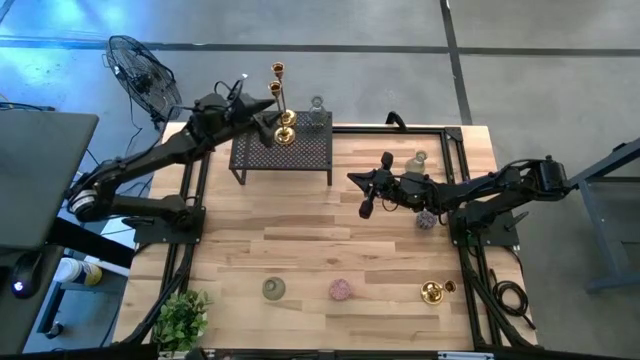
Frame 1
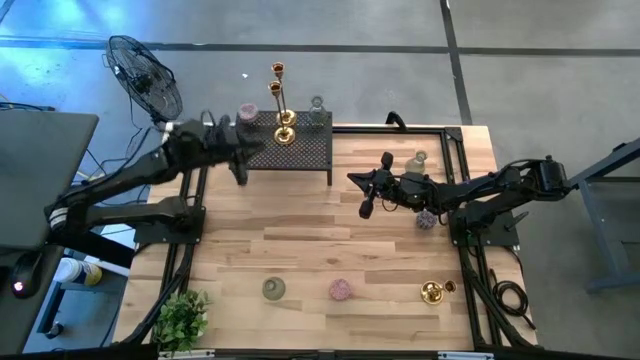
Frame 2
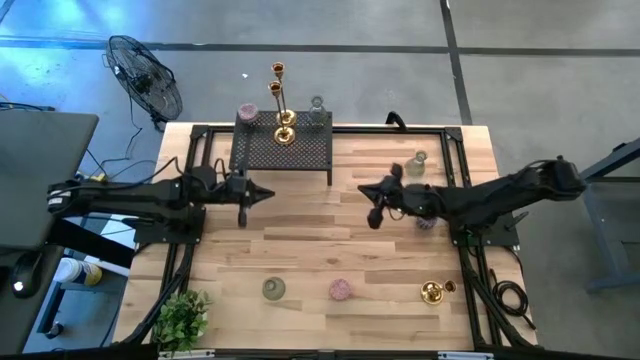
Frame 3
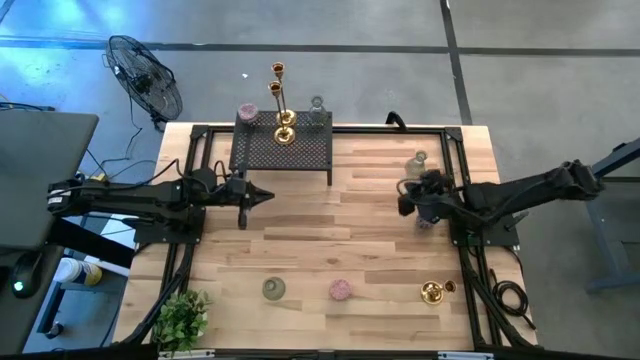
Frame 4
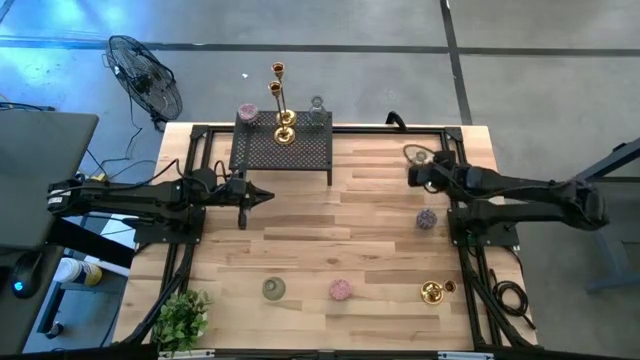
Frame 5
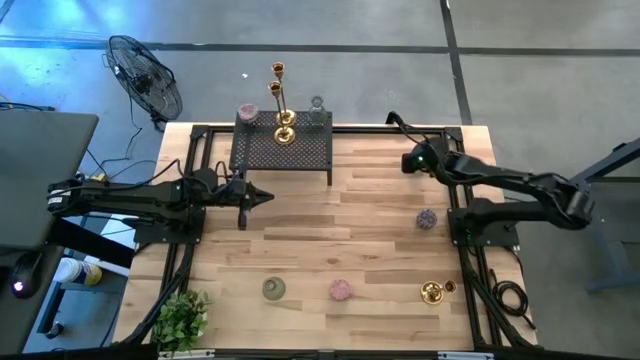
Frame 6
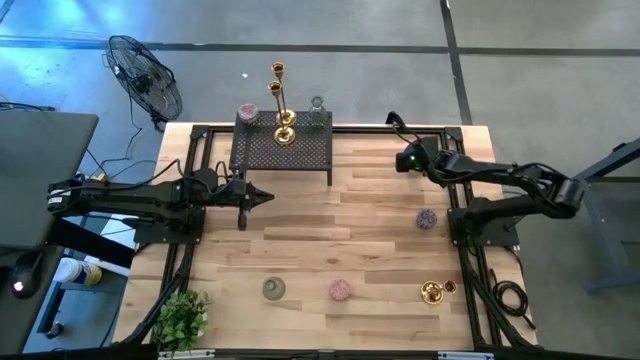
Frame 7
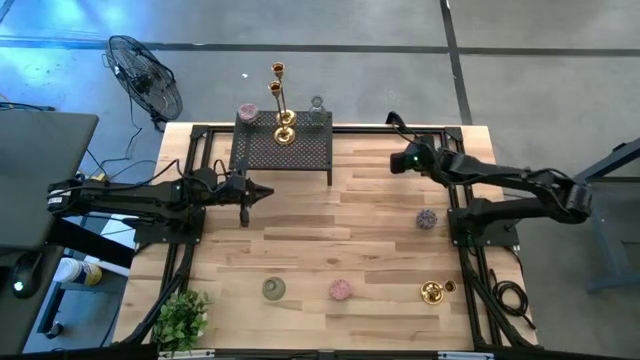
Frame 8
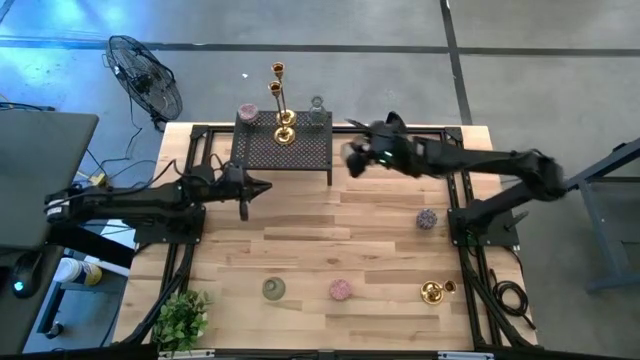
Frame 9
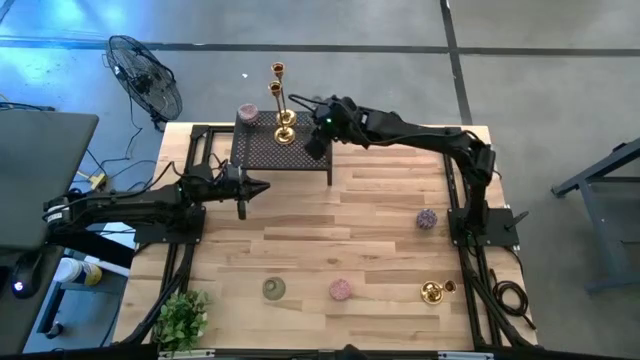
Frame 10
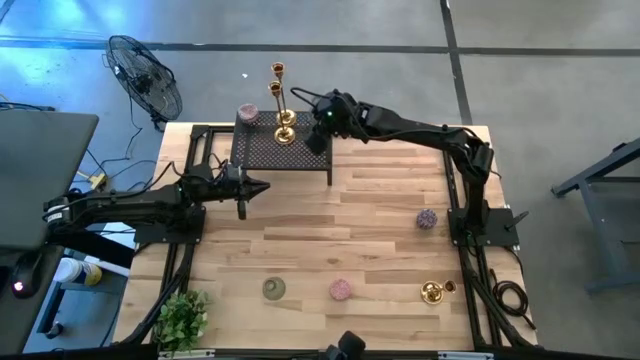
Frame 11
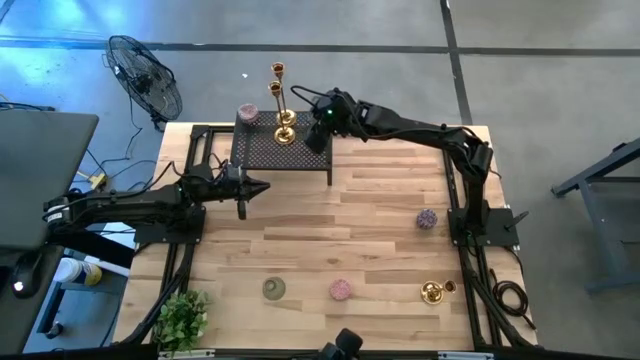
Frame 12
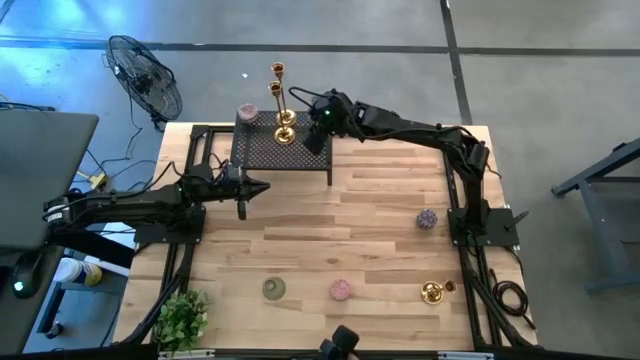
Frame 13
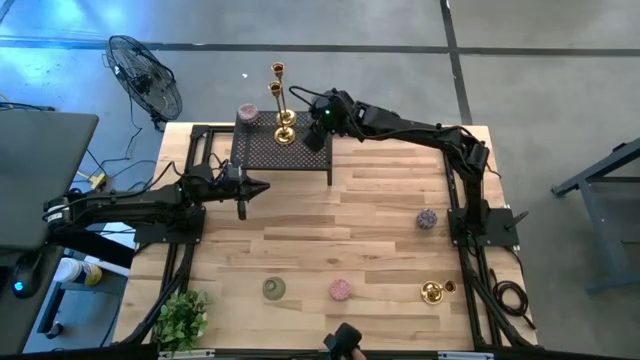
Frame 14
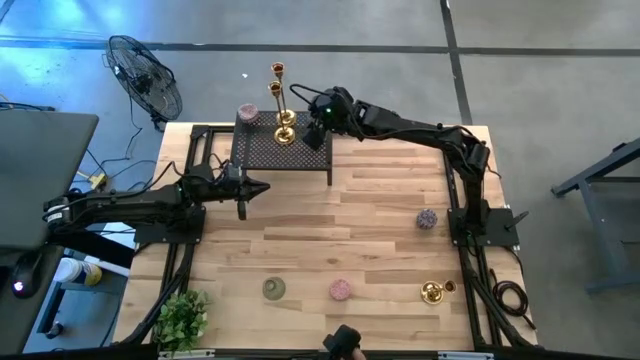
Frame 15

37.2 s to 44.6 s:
Task: Pick & Place candle stick holders
Put the top green glass candle holder on the shelf aligned with the other green glass candle holder

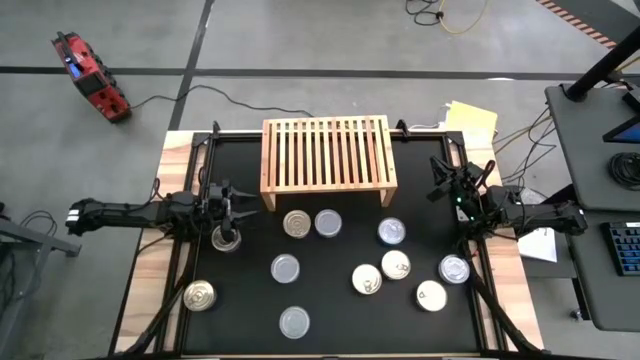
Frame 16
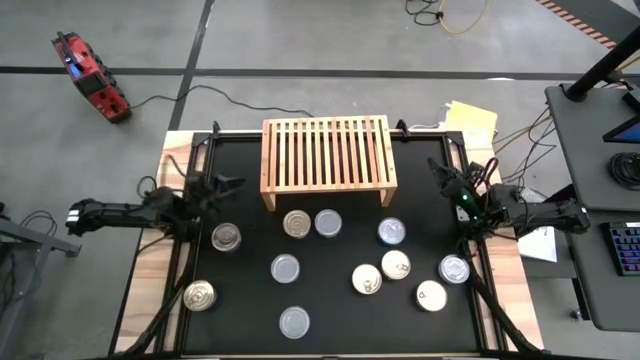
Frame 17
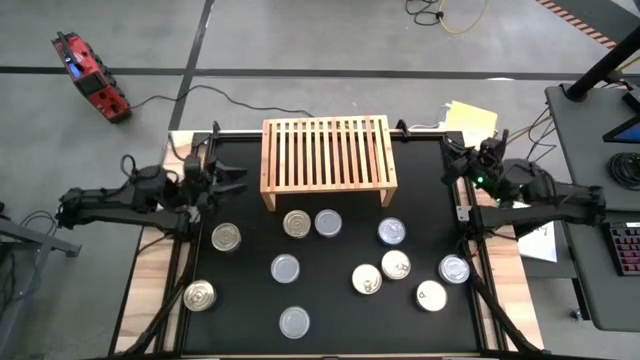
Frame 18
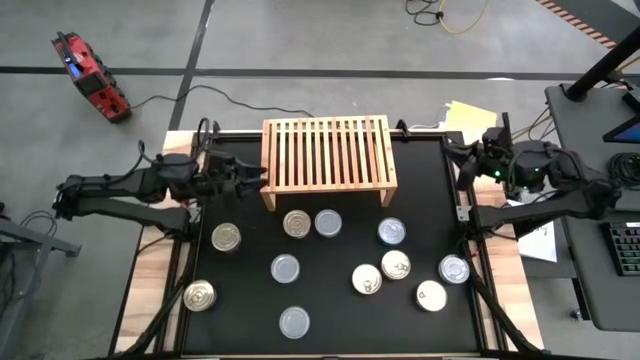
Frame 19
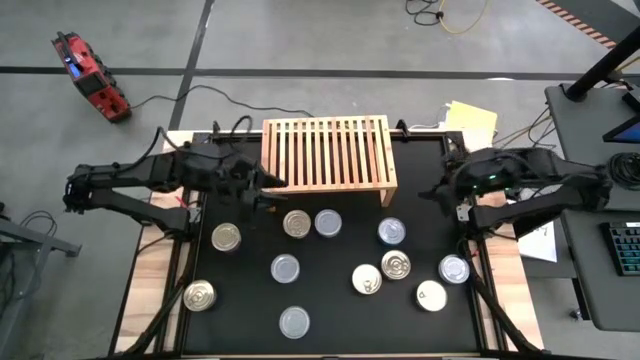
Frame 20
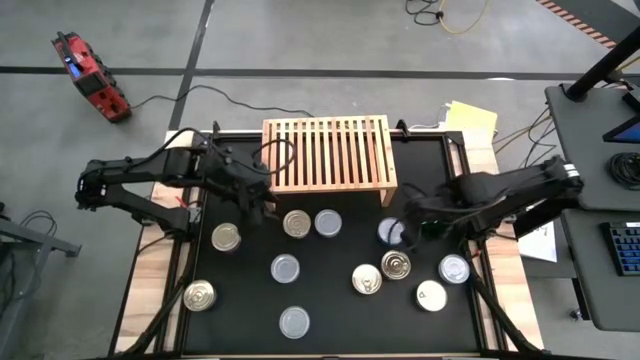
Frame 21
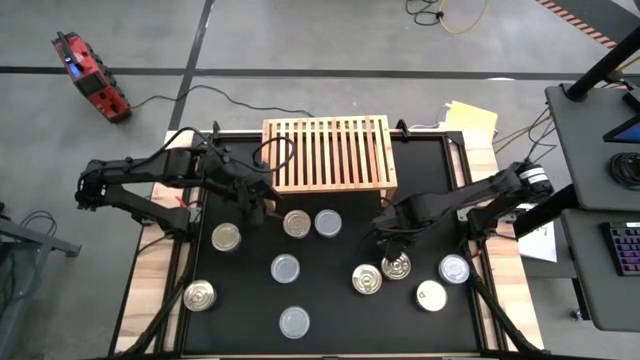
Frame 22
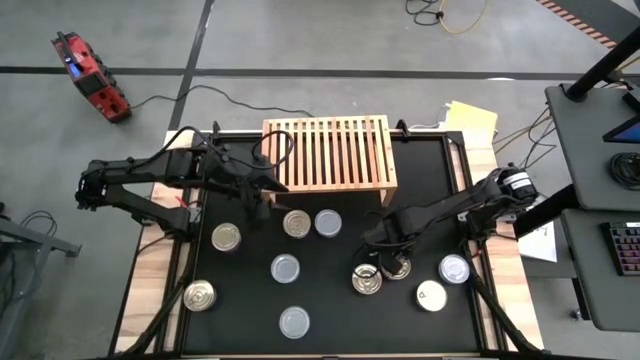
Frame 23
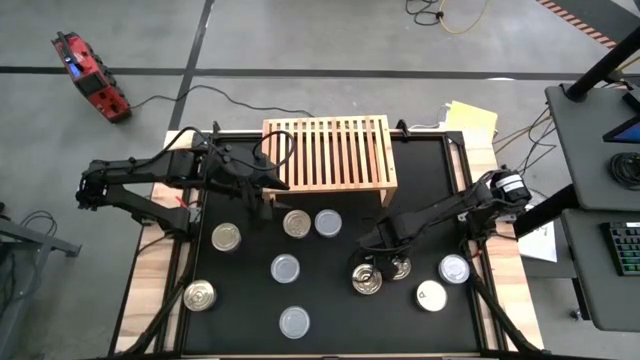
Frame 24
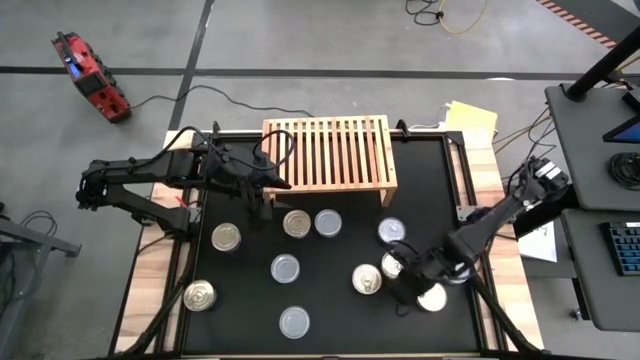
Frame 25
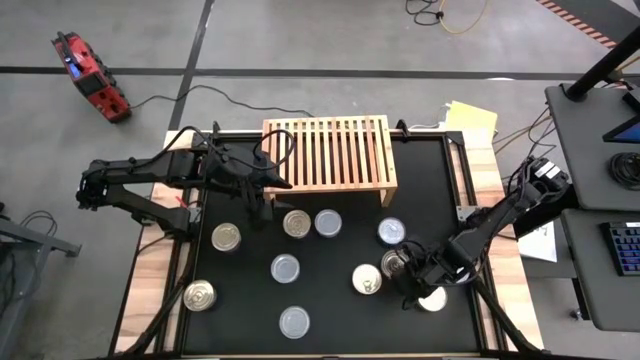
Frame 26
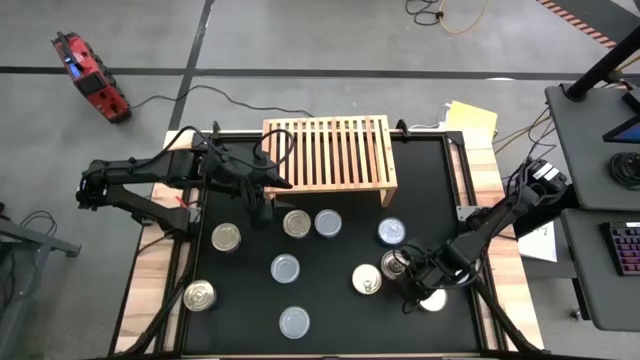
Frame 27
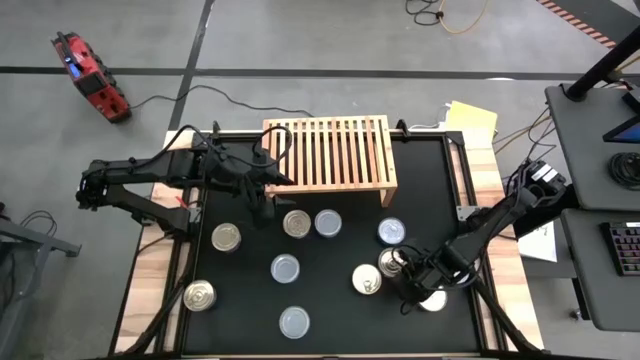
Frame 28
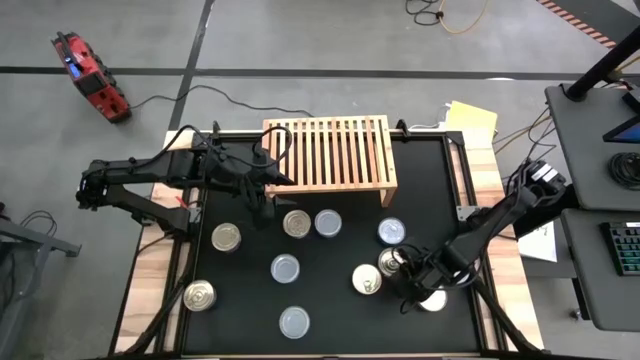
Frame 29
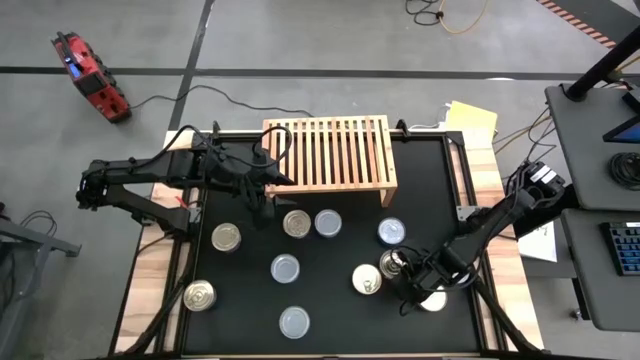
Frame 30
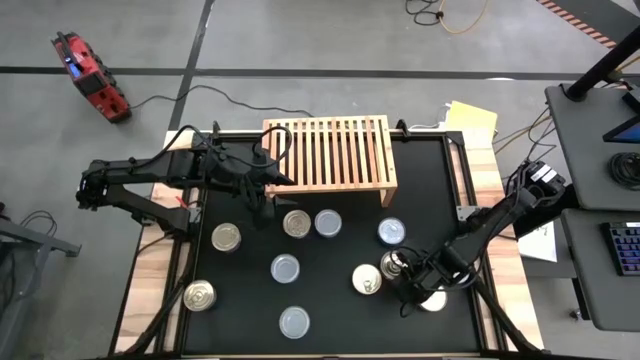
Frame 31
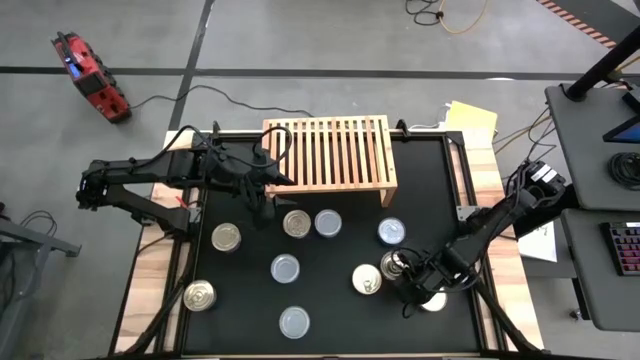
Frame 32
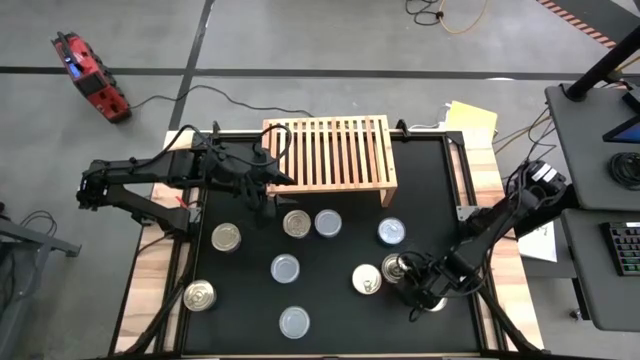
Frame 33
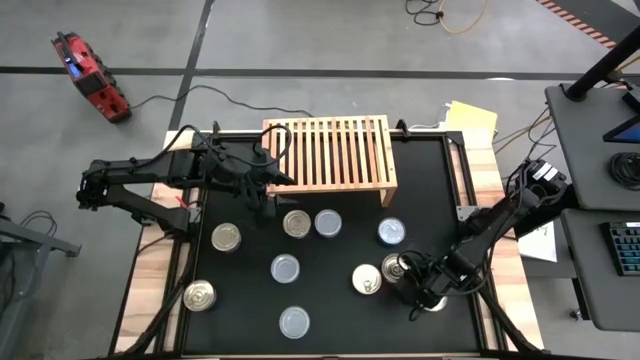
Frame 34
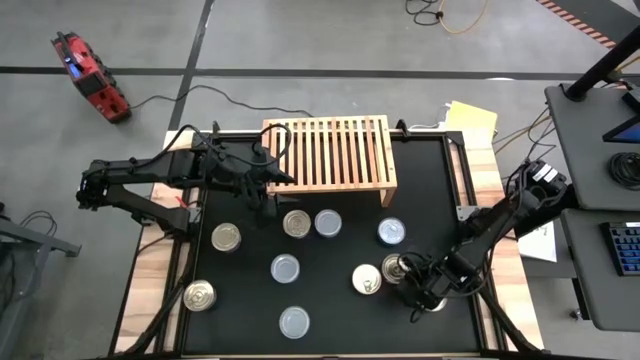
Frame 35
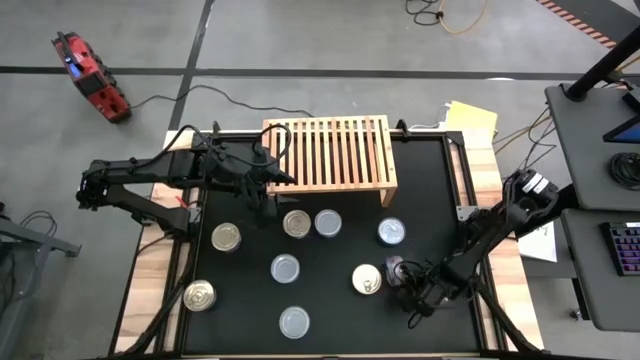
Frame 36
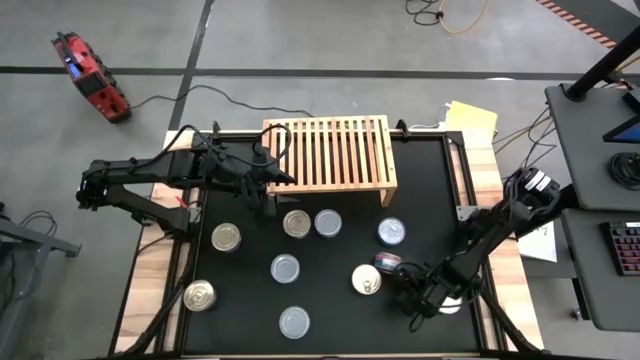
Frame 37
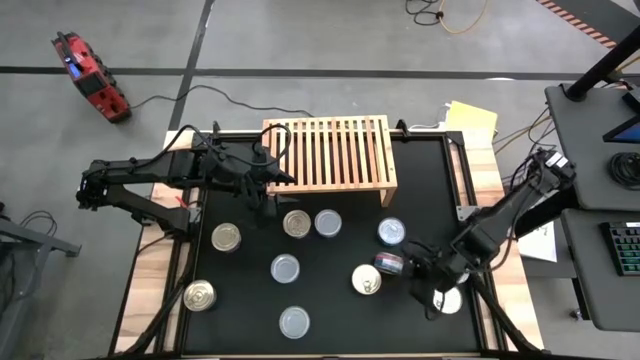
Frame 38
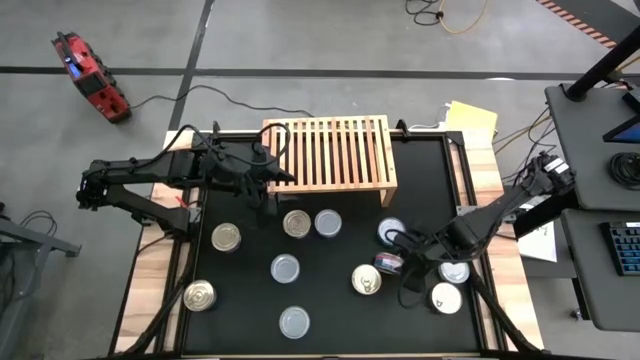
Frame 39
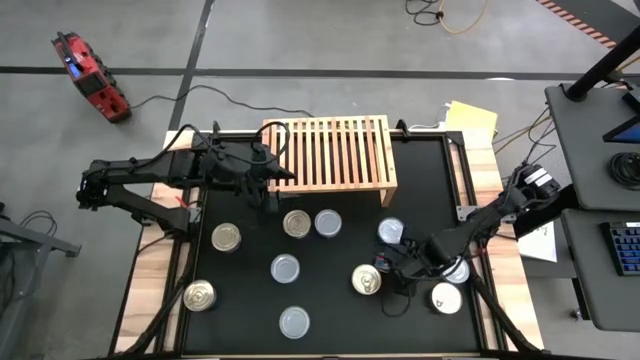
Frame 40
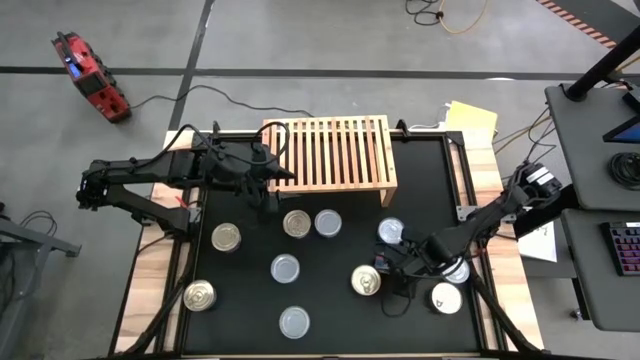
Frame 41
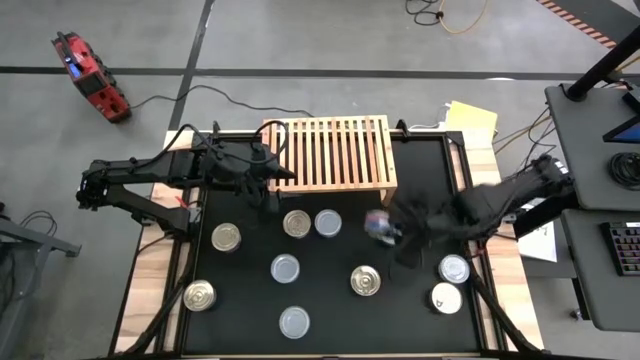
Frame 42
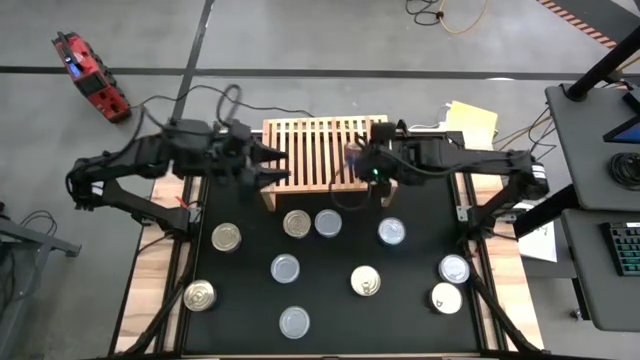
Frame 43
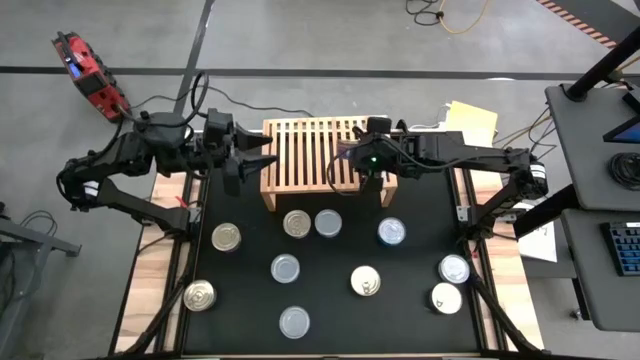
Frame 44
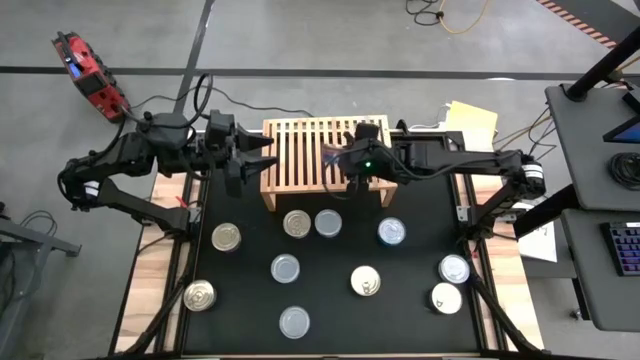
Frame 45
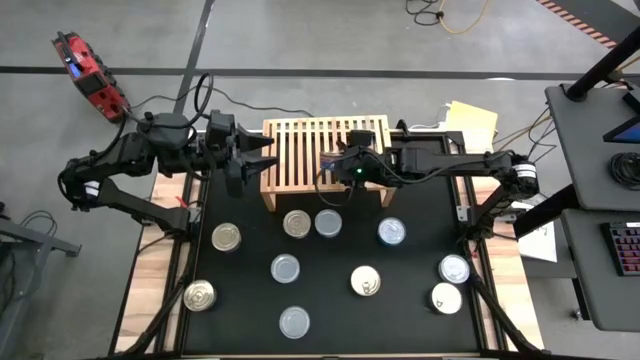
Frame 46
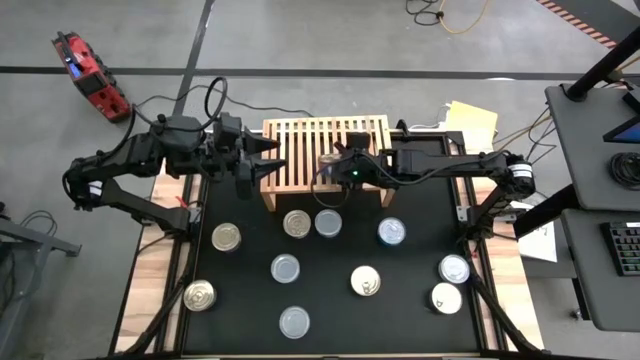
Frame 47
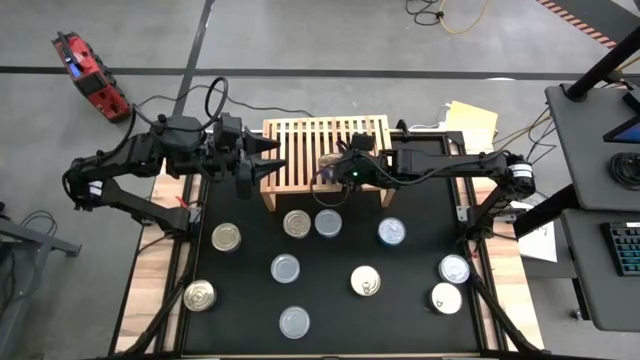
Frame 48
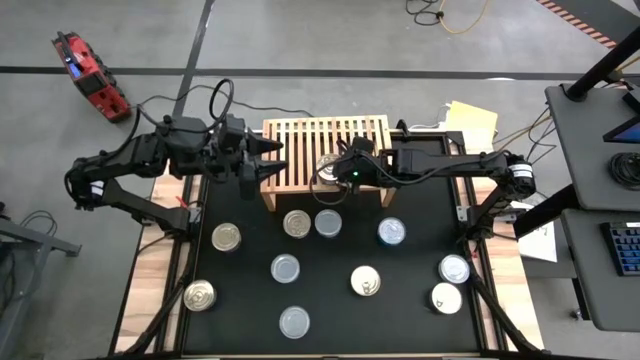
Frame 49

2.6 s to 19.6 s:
Task: Stack canned seafood by type on shelf
Put the blue pink tuna can on the shelf
